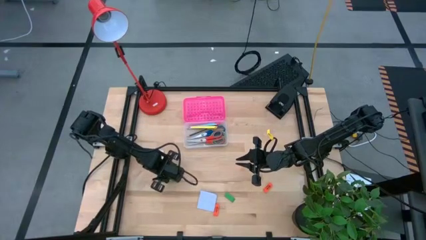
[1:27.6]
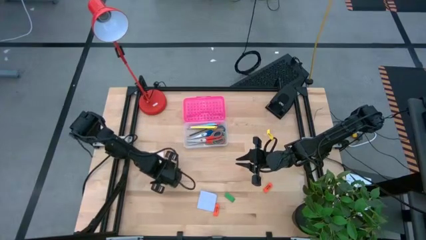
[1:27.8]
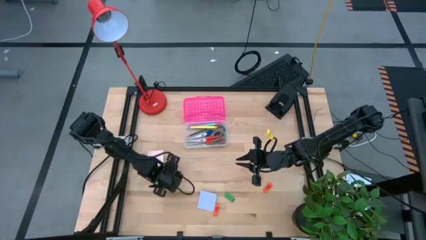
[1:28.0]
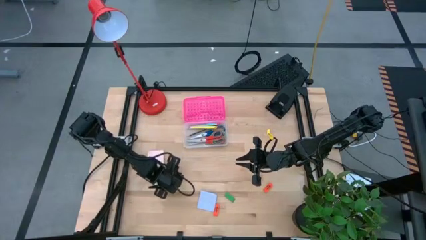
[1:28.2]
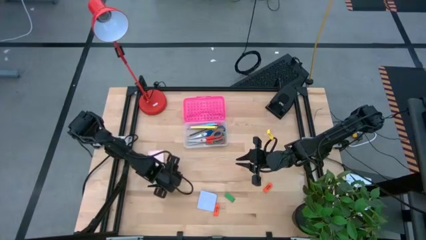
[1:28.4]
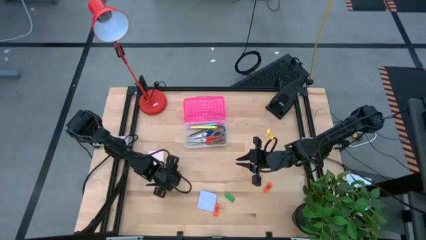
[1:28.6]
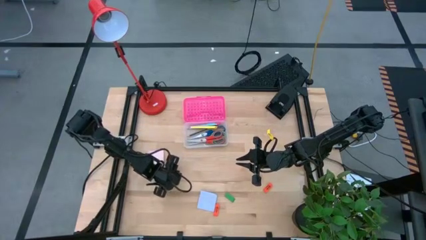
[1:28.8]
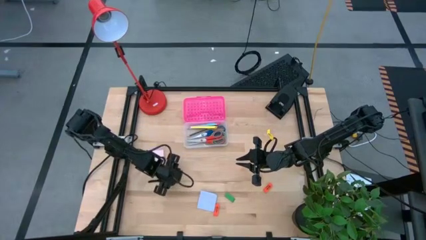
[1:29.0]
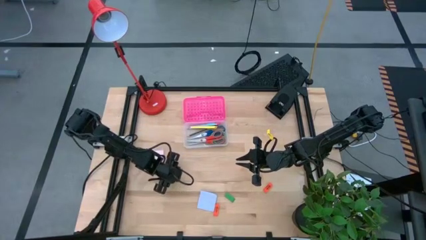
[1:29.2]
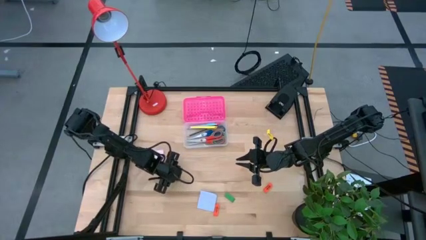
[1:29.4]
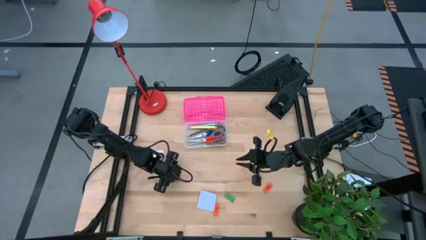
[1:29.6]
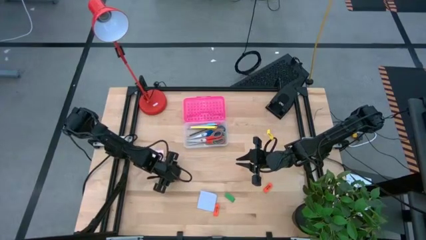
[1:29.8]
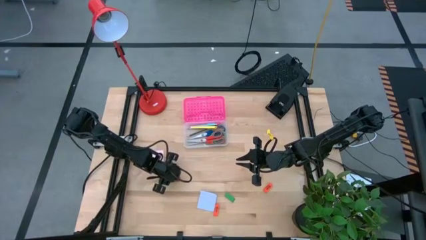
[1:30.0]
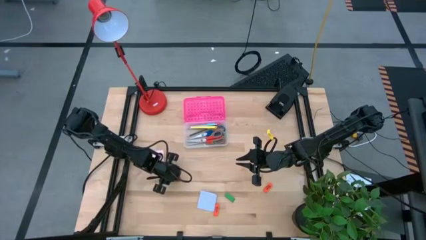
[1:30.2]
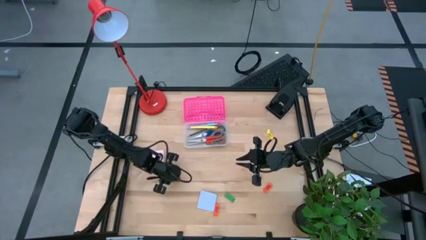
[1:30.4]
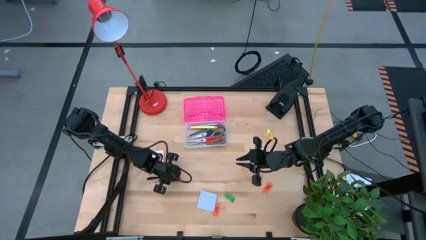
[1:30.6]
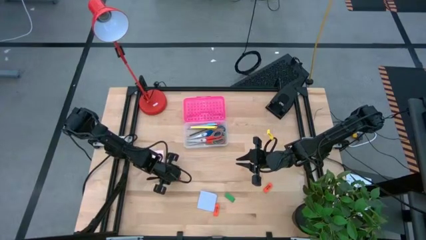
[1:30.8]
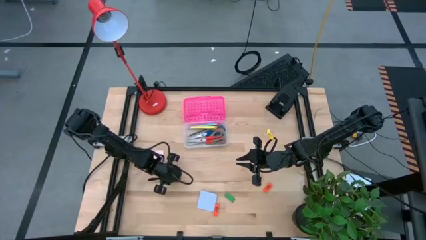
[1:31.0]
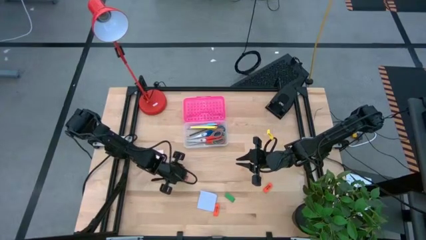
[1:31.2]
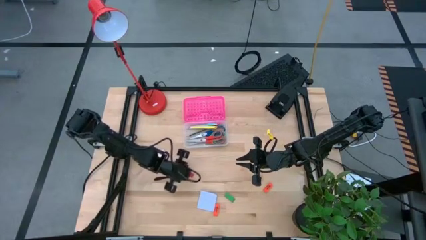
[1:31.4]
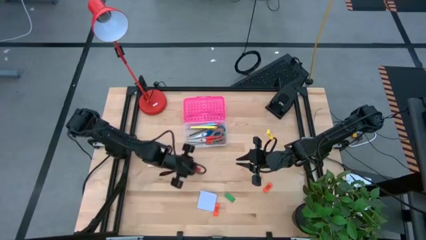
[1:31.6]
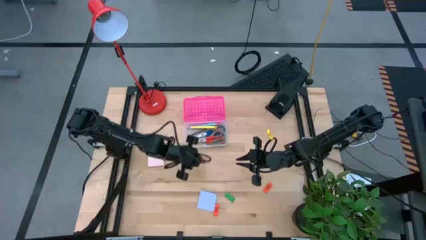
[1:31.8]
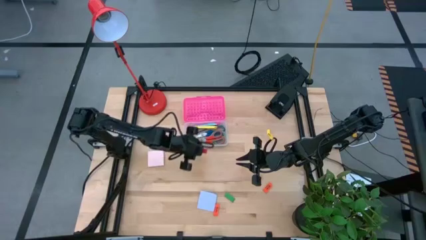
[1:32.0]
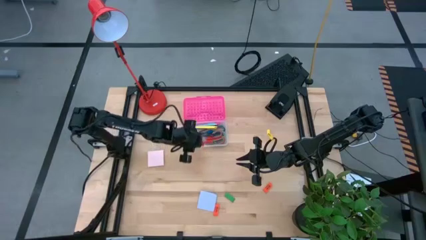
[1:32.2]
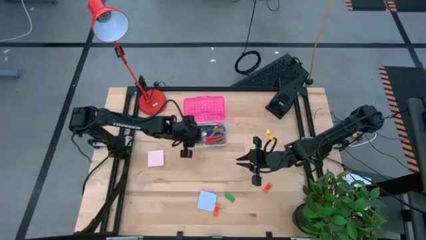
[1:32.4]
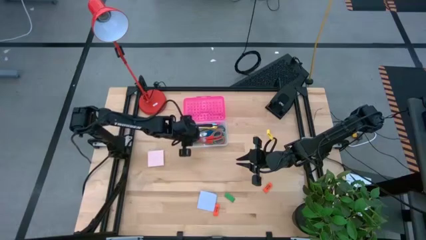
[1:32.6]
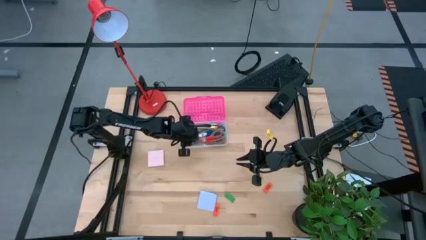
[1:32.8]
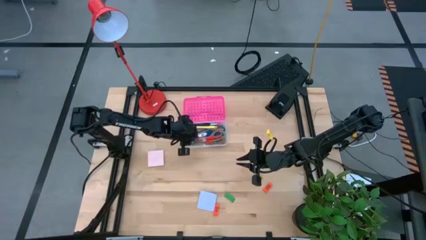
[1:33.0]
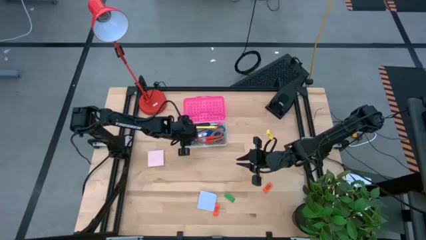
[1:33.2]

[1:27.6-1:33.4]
Task: Pack school essentials
Put the red eraser into the pink supply box

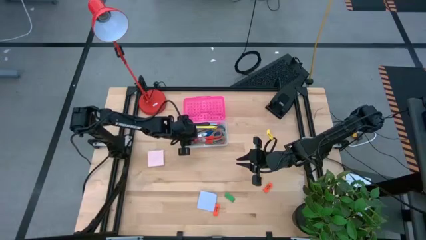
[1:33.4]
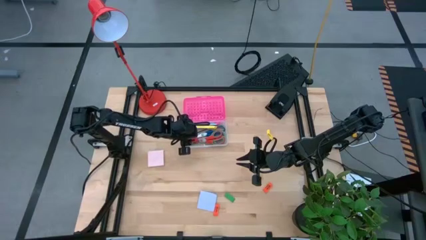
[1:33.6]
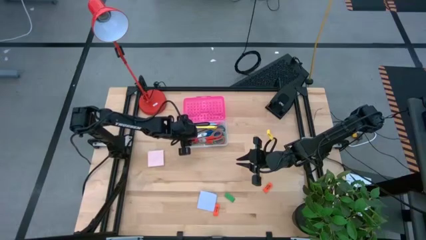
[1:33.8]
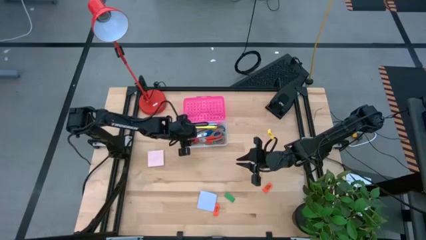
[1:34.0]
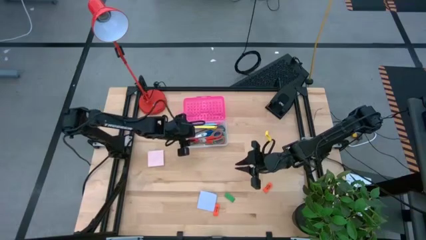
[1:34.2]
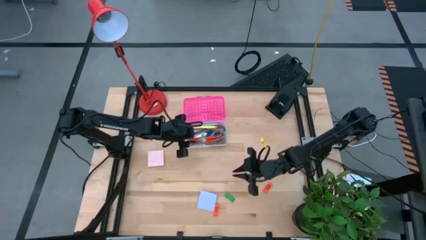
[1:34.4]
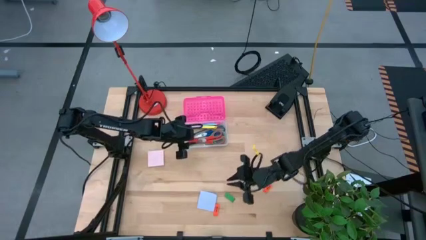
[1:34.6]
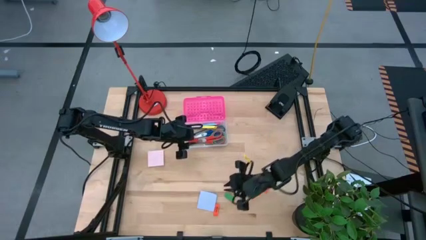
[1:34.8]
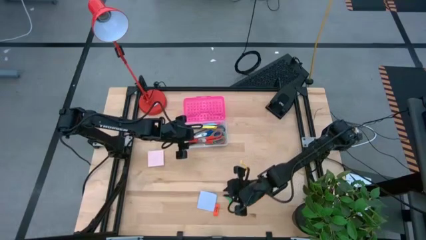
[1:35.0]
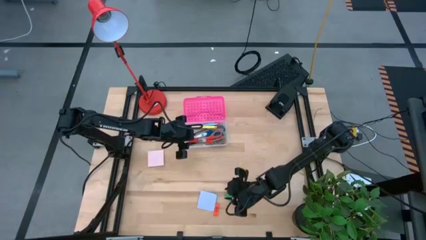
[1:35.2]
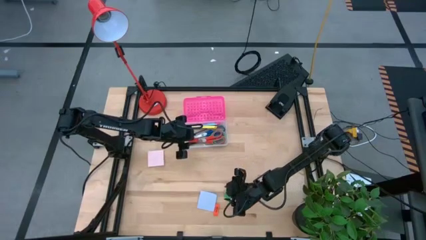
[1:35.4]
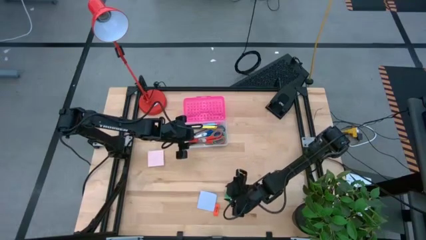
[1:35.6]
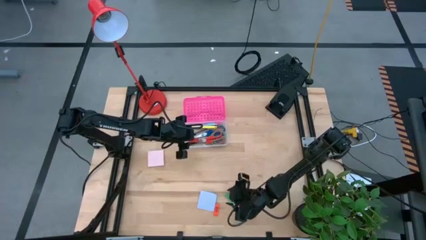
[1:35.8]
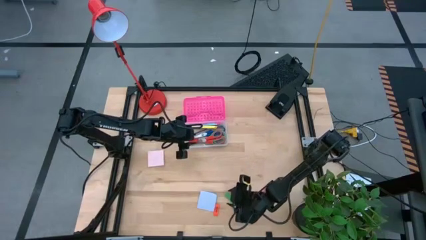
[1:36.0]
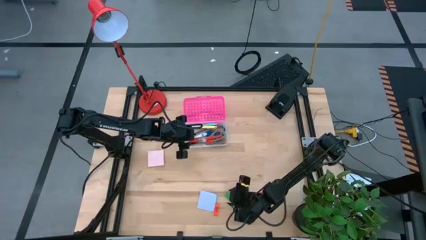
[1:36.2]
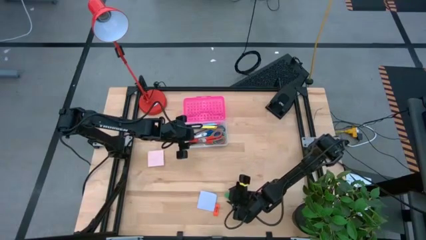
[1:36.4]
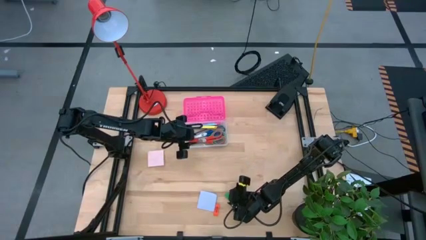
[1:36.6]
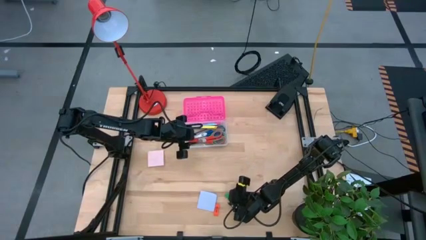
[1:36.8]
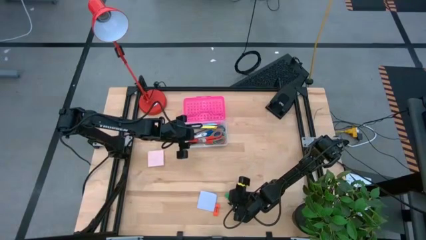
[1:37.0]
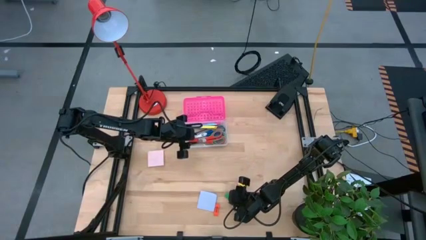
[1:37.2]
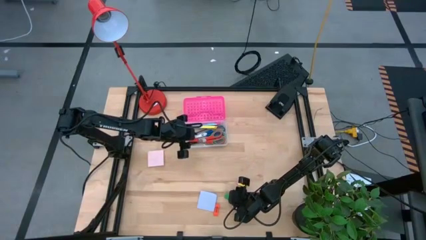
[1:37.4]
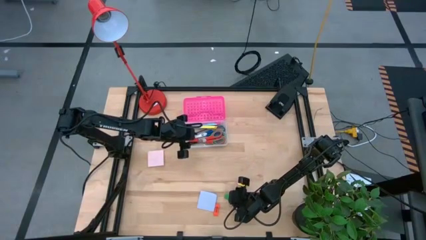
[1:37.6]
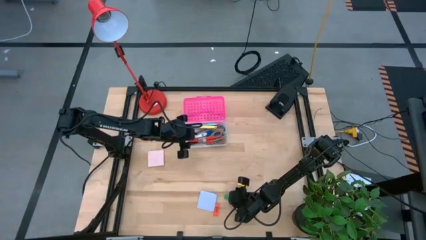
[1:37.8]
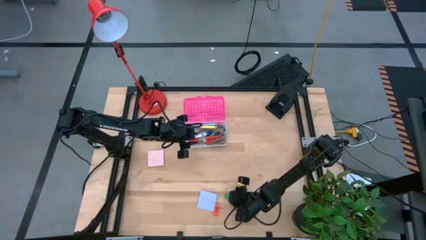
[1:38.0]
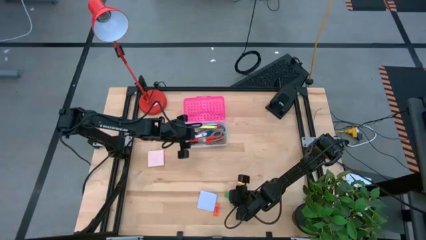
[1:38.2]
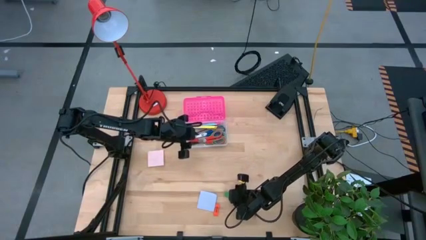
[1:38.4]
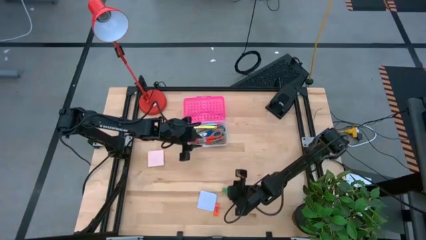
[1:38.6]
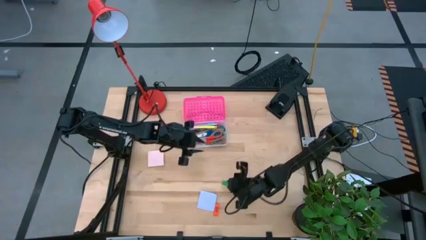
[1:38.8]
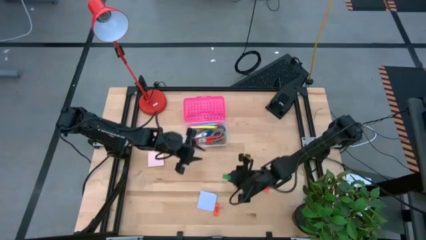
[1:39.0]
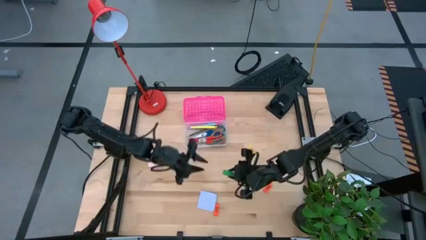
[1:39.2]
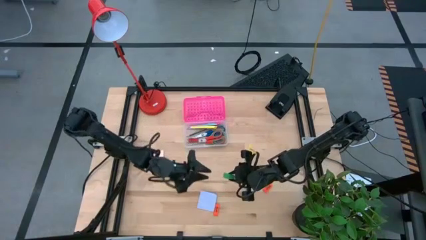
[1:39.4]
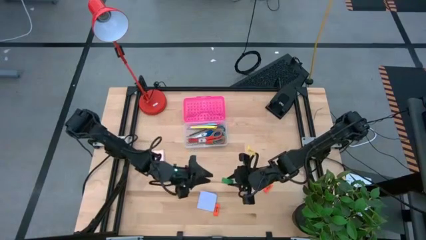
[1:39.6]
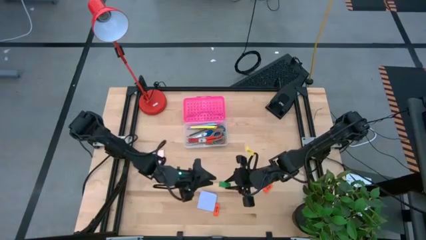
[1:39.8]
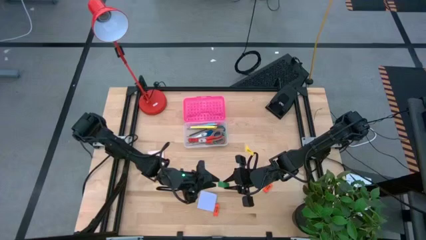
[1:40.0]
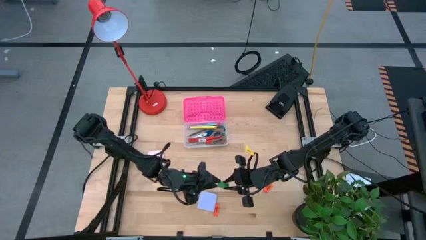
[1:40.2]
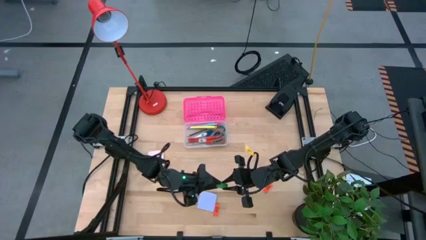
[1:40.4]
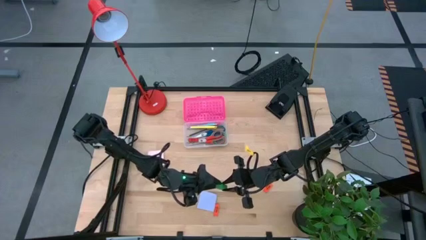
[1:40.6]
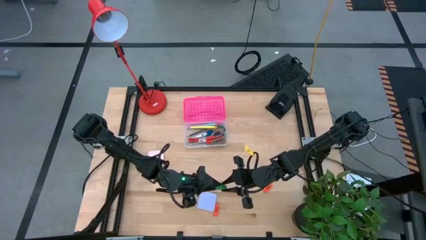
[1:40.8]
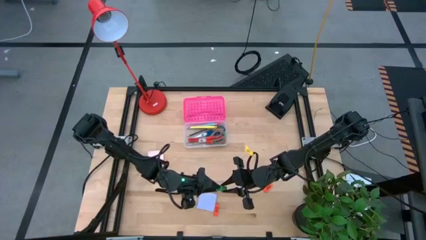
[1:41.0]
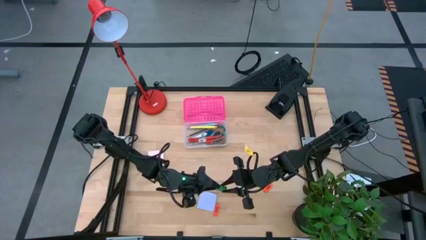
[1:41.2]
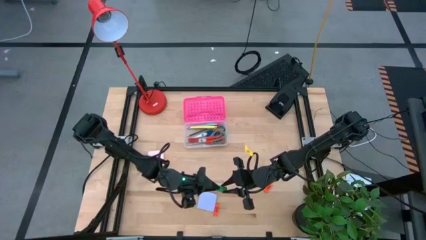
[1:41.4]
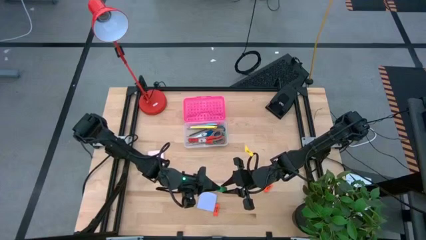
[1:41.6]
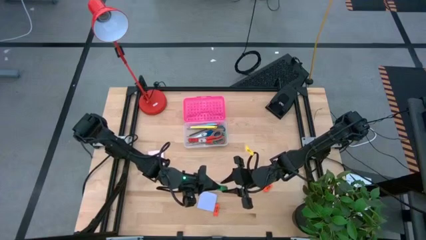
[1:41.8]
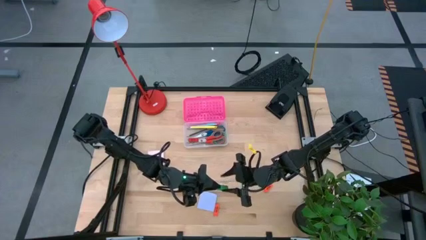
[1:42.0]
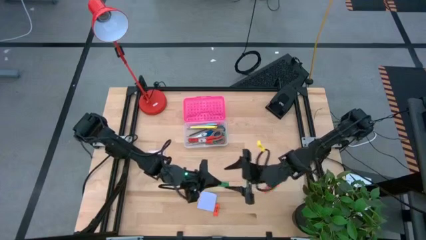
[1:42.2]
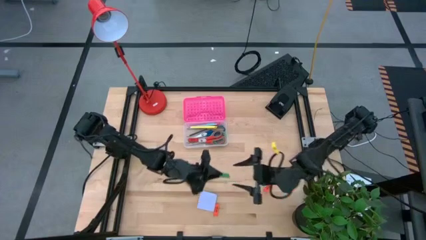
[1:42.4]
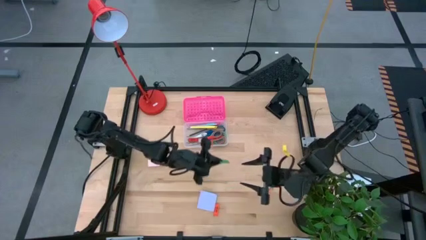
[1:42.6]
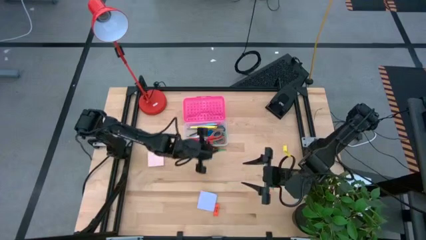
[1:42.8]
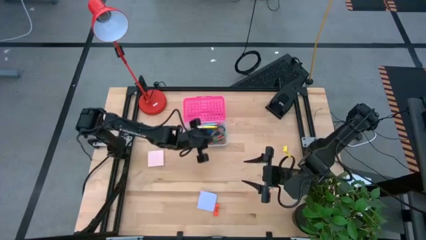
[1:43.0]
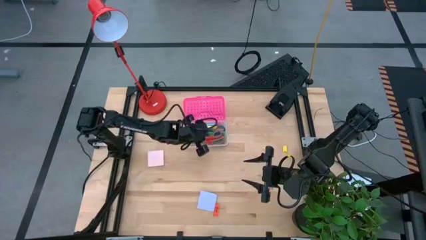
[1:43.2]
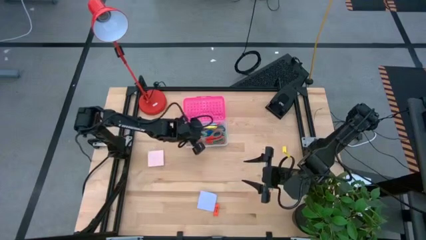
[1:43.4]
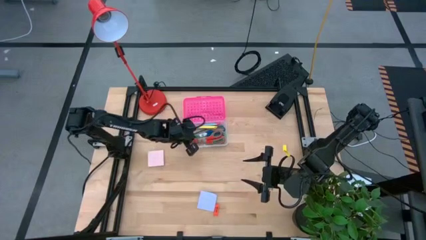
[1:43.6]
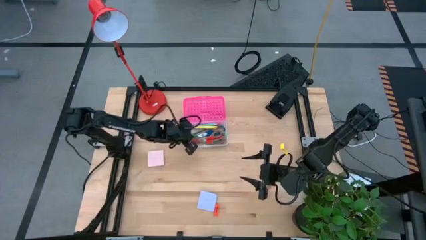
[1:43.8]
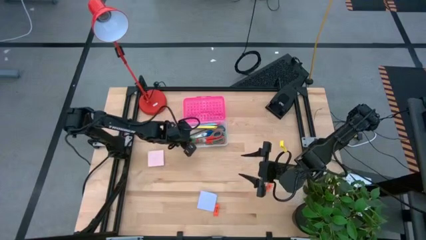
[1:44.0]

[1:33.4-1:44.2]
Put the green eraser into the pink supply box
